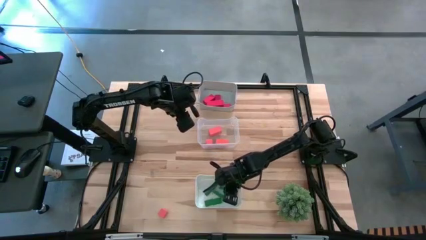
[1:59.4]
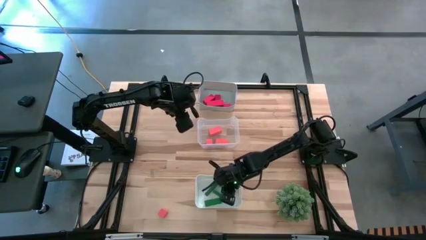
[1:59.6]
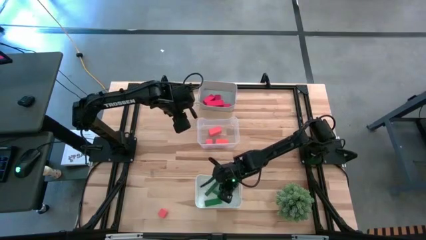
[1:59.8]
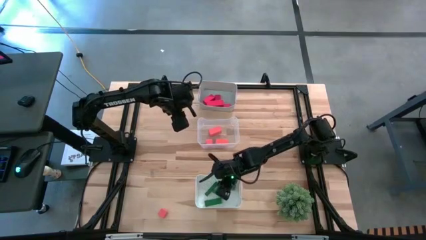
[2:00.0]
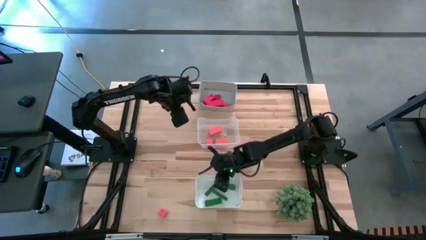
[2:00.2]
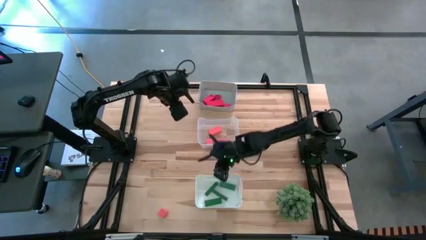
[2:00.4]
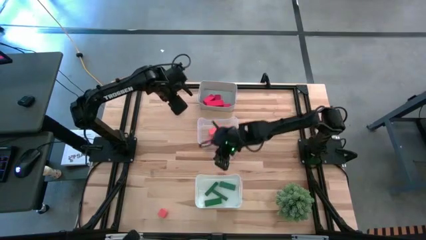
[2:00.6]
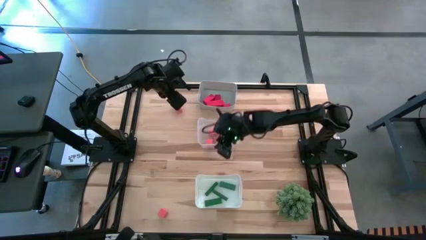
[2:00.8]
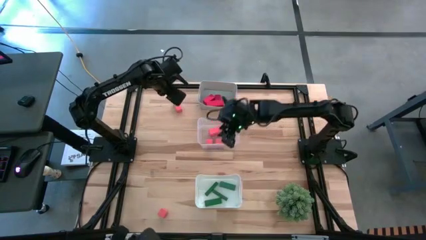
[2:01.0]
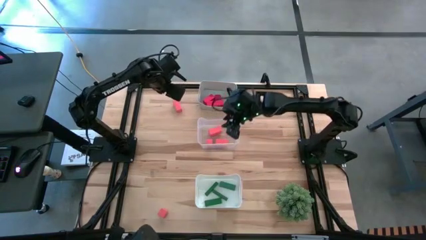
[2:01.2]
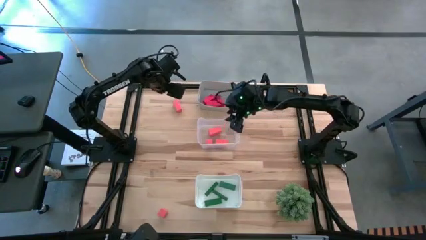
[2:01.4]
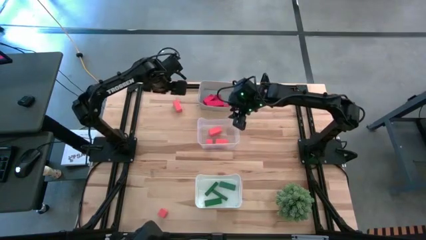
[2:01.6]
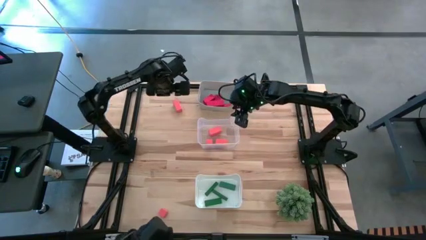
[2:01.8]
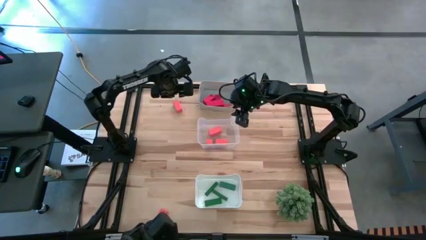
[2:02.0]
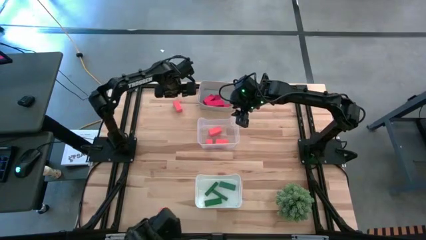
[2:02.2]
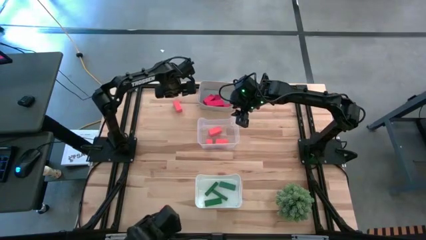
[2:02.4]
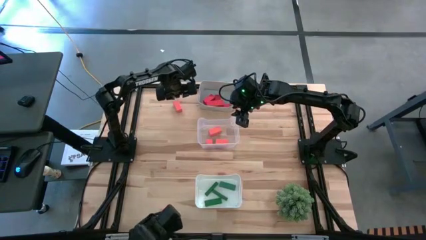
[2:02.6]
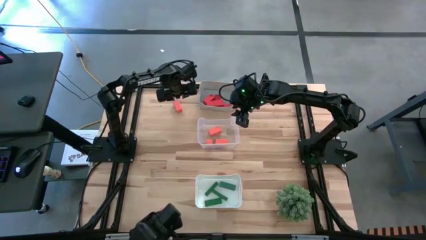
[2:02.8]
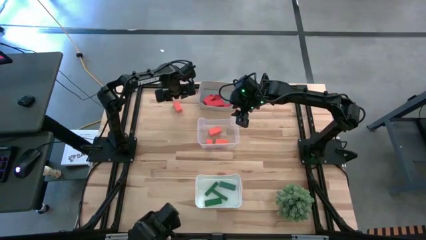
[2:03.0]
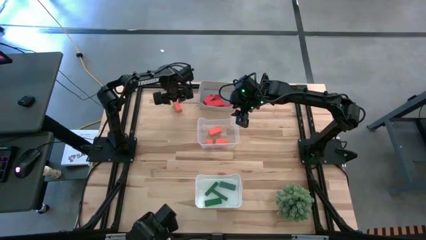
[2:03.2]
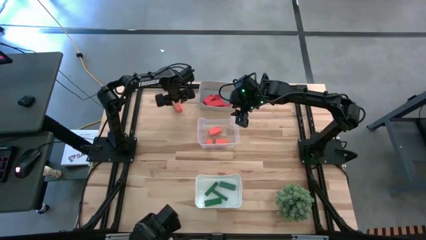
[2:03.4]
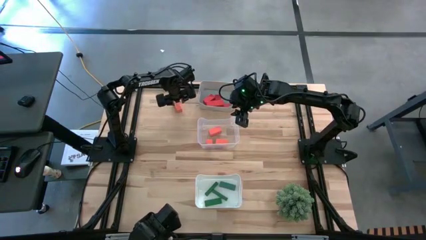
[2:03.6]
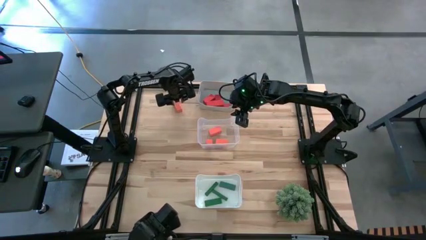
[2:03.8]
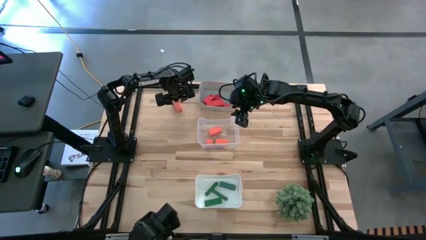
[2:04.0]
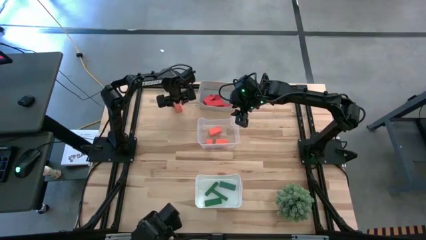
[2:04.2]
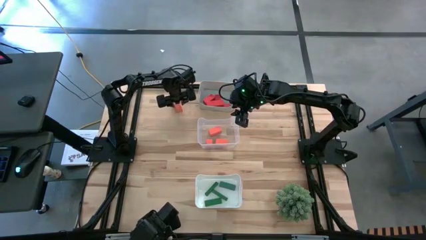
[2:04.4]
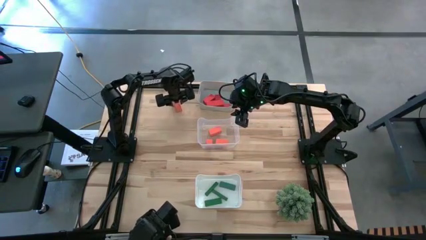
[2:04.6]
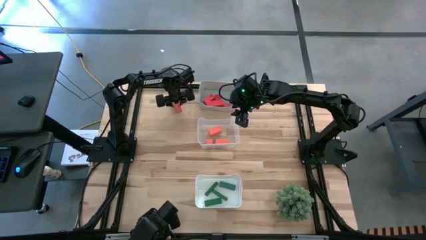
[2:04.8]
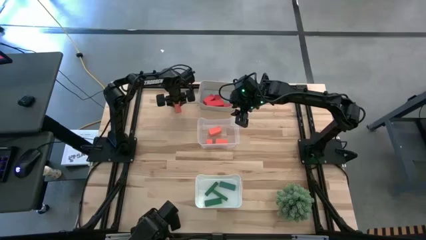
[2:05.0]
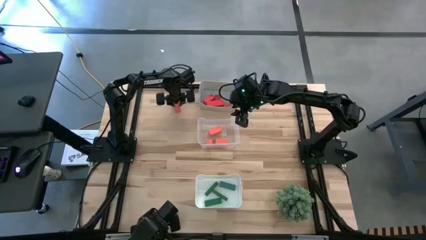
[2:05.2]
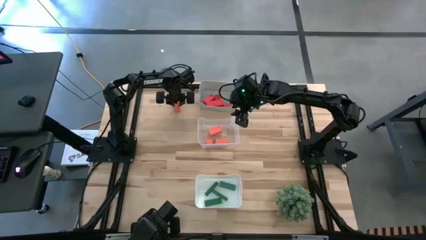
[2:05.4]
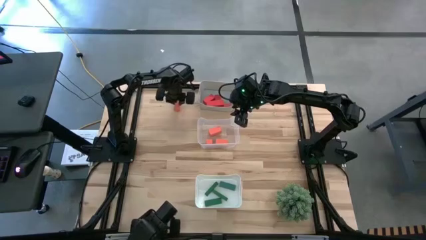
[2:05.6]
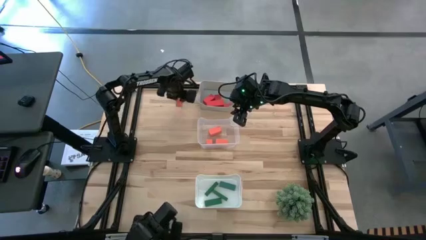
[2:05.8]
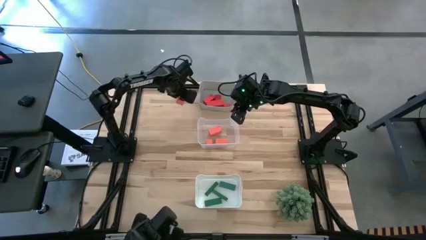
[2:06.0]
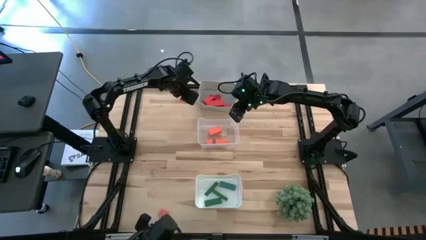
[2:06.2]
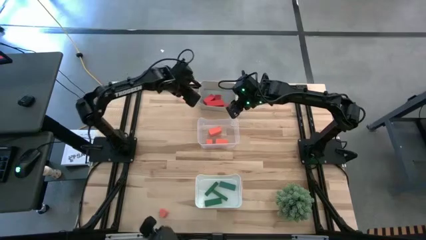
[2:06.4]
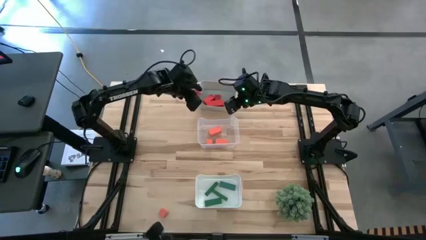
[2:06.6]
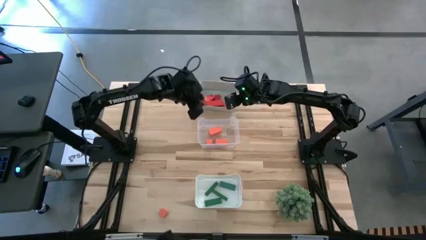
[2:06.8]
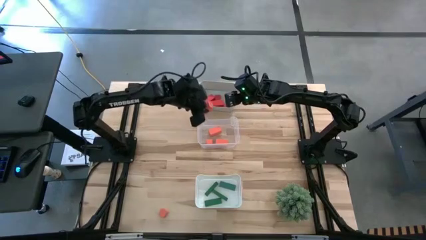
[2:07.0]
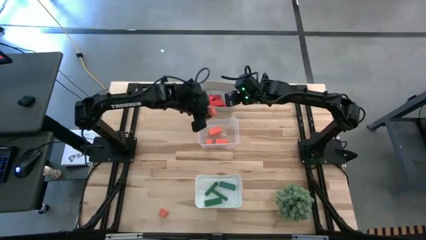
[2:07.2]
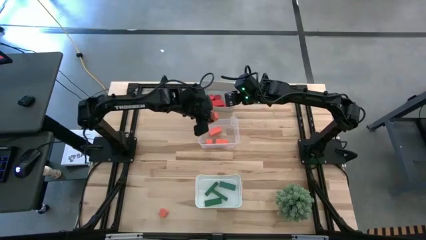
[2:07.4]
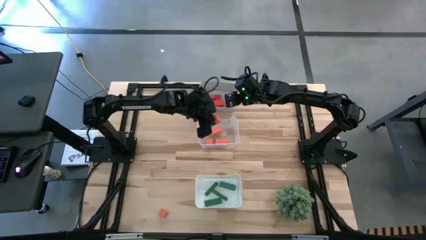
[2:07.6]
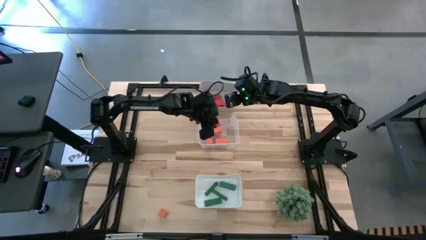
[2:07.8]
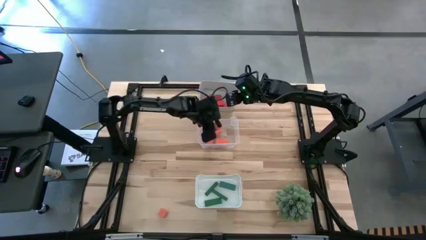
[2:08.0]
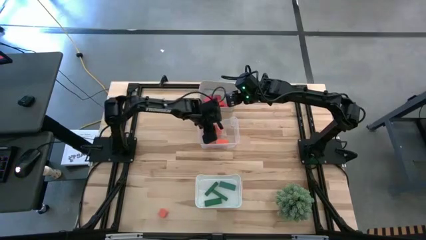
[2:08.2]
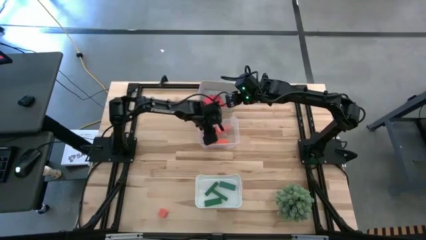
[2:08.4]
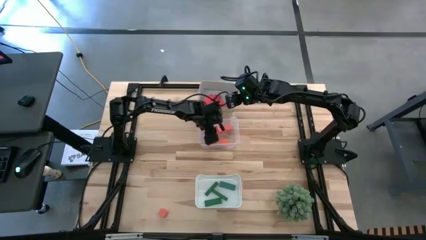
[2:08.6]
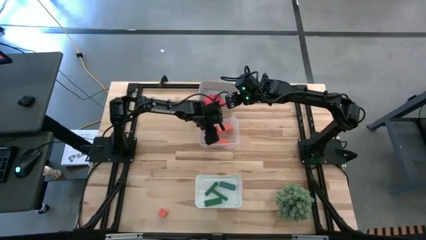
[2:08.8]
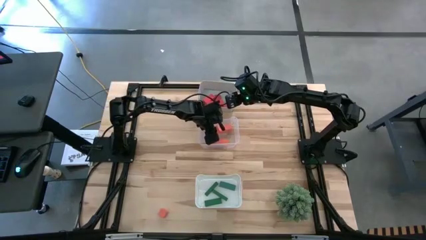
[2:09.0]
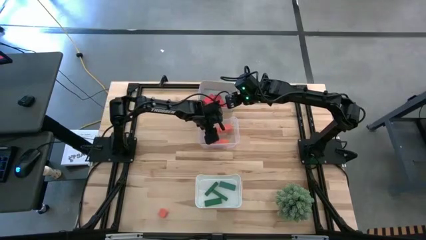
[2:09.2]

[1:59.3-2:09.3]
Task: Sort & place blocks by color
Put the orange block into the transparent bin
